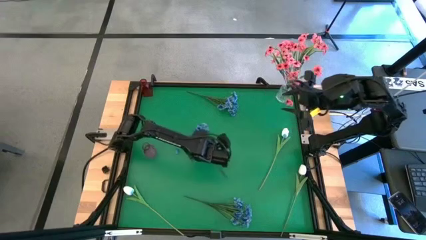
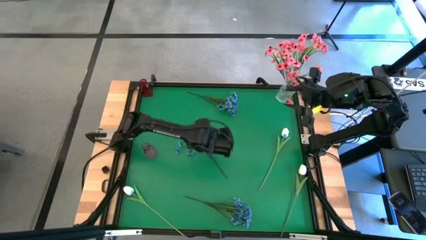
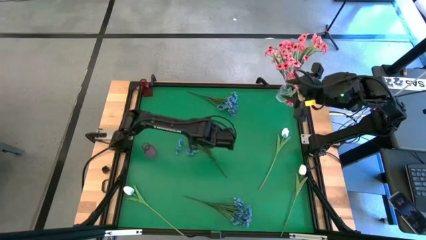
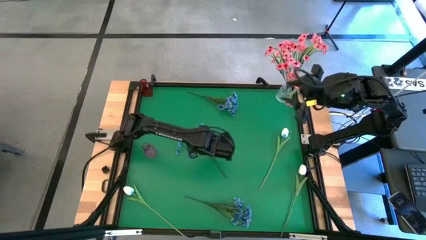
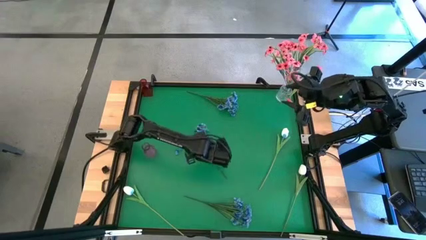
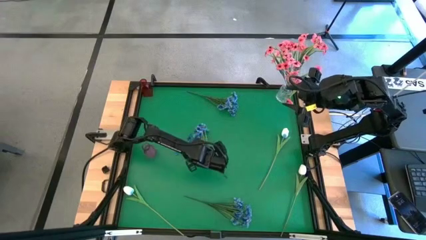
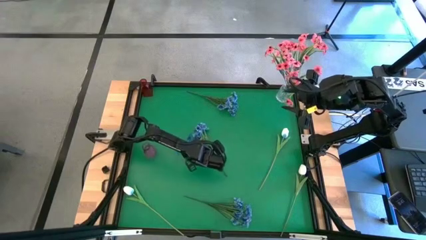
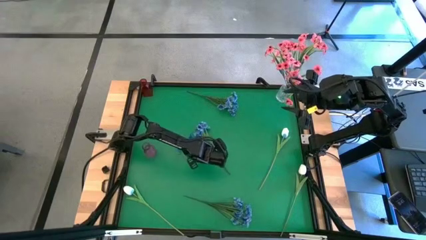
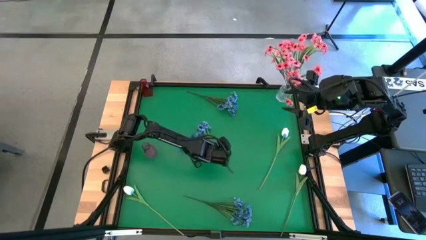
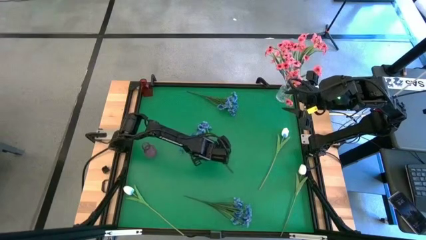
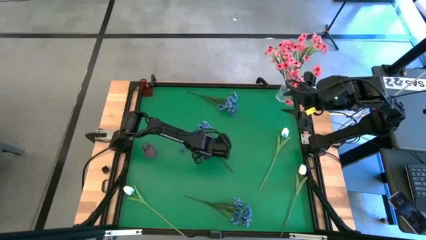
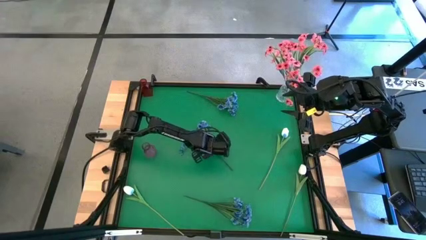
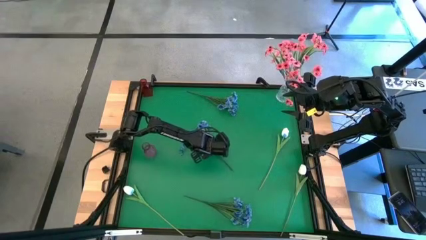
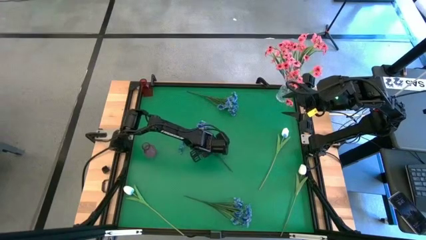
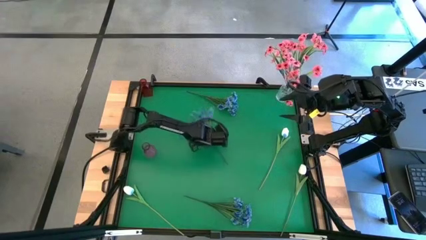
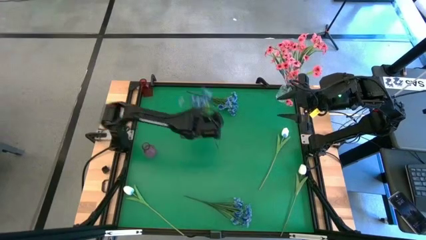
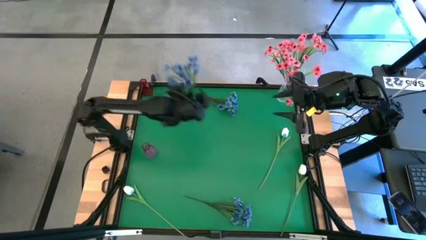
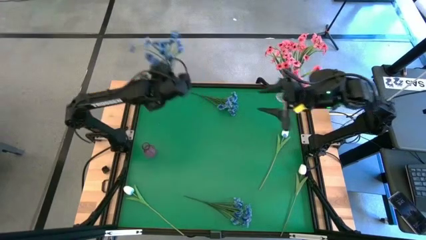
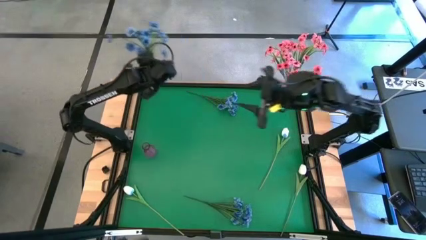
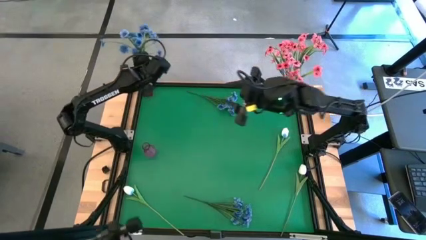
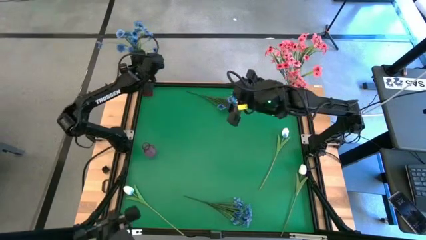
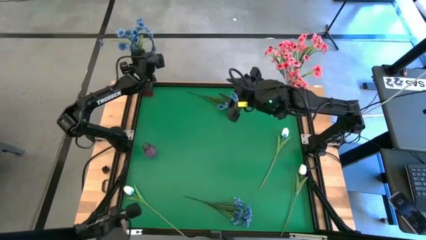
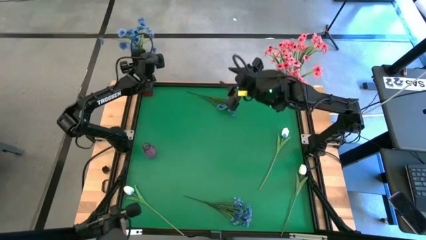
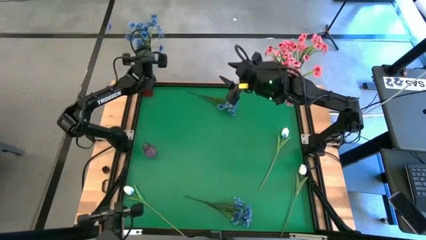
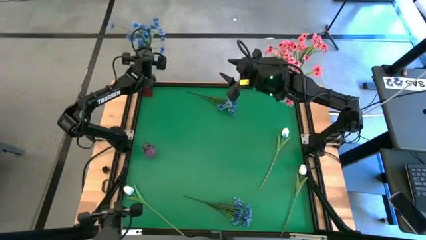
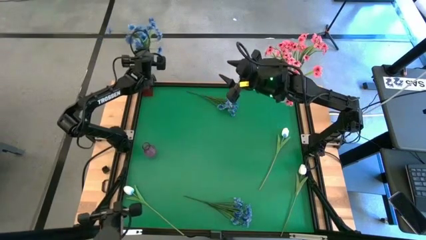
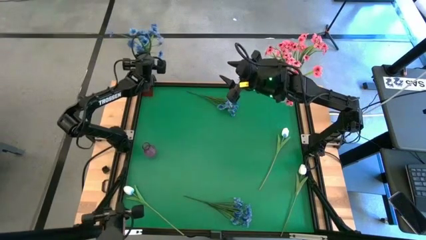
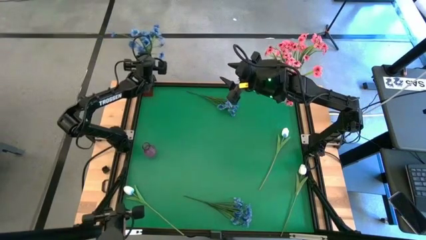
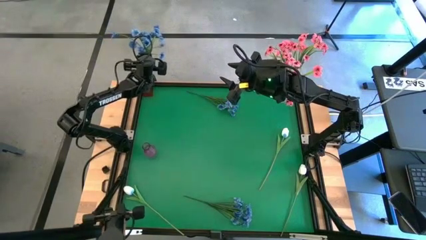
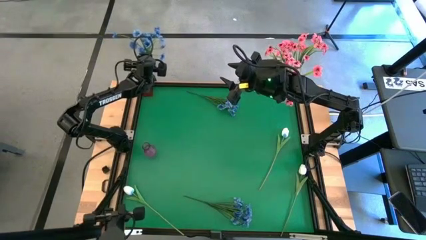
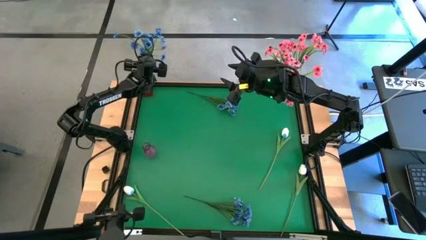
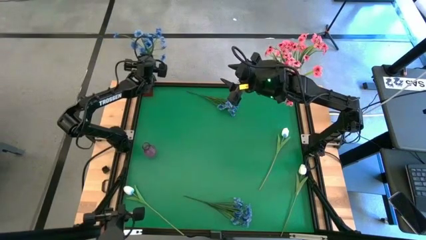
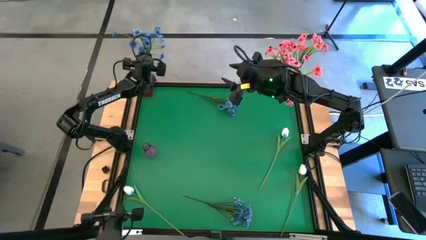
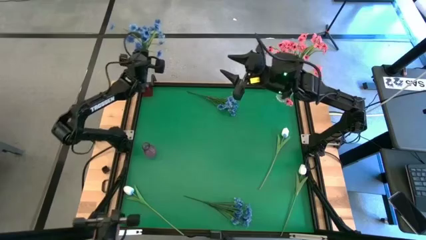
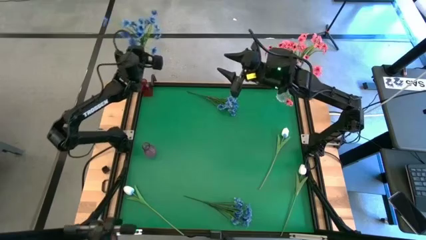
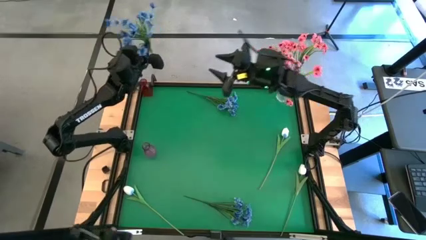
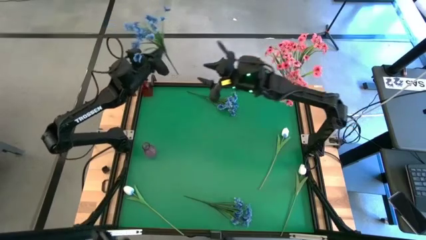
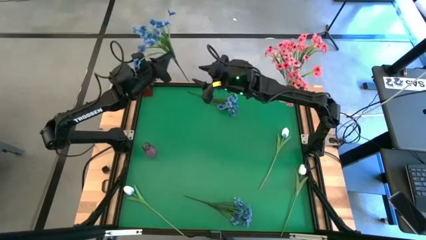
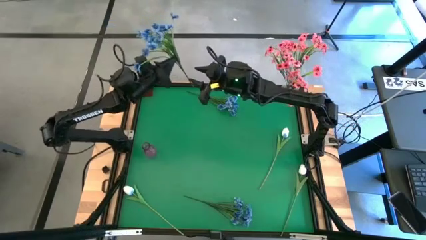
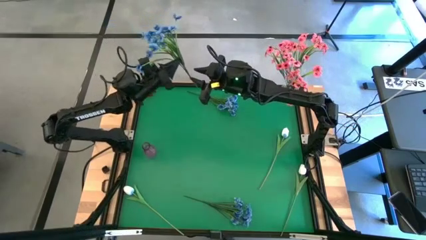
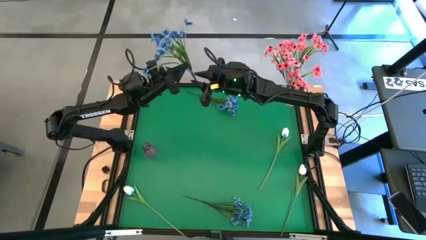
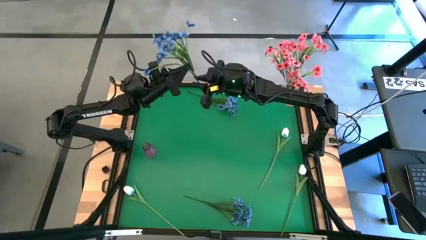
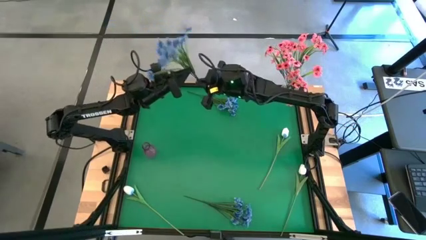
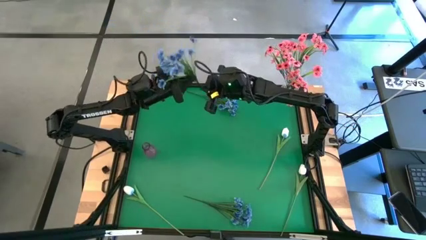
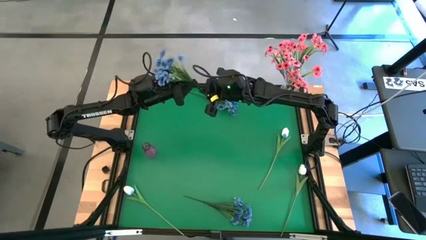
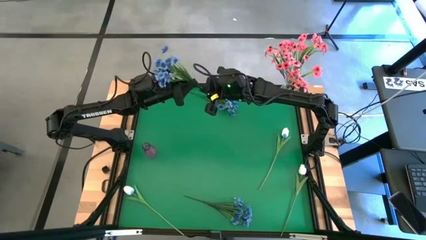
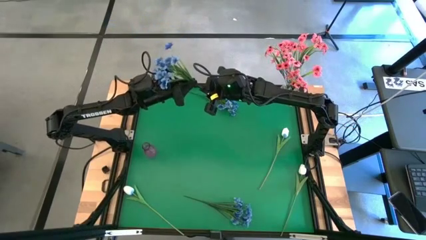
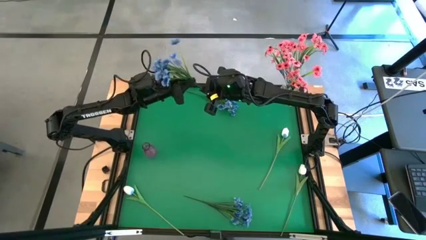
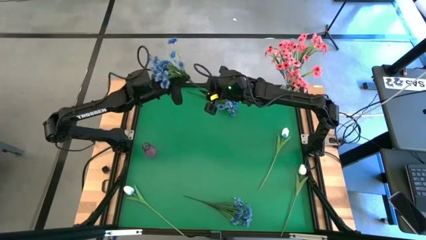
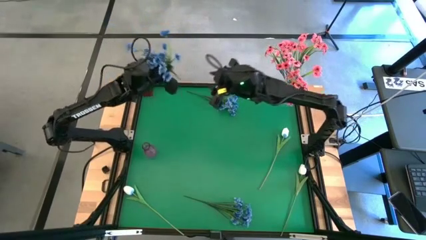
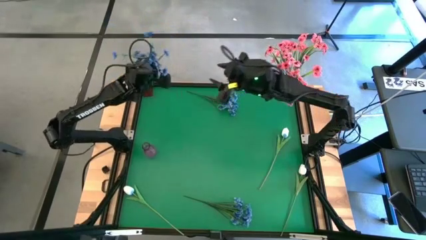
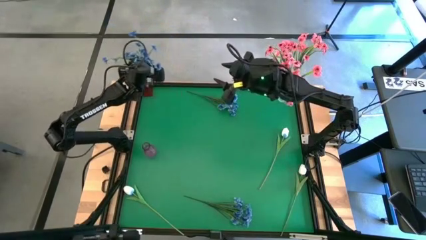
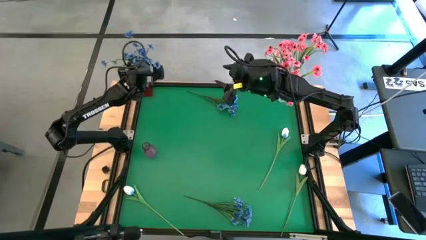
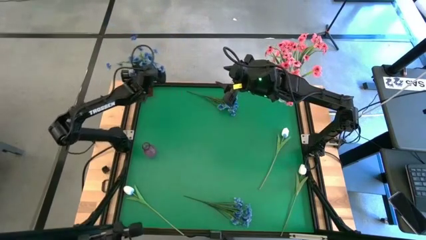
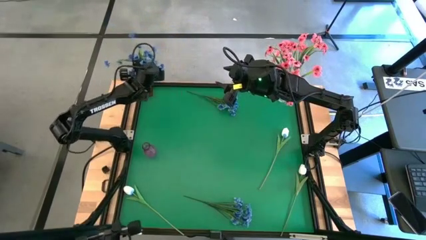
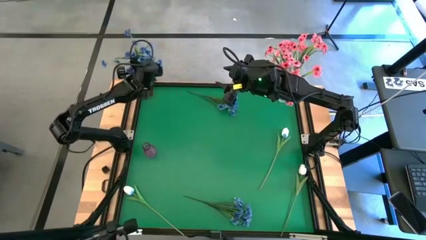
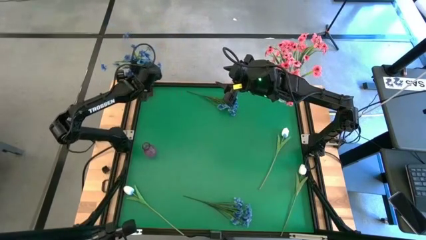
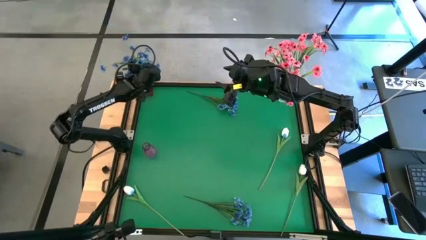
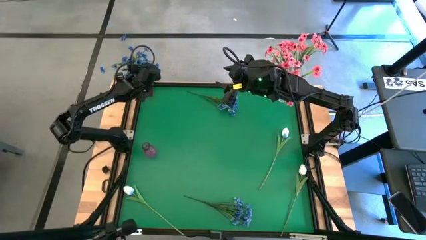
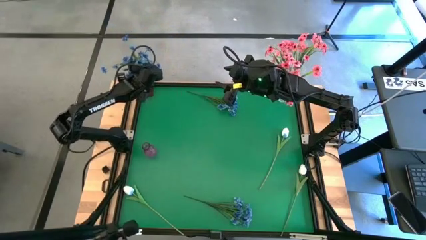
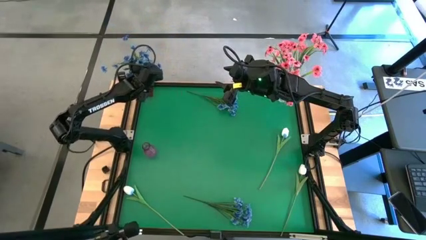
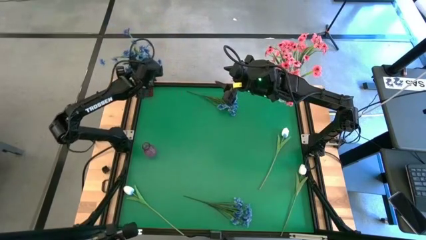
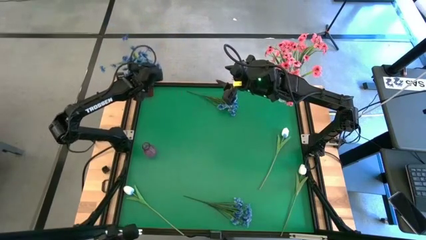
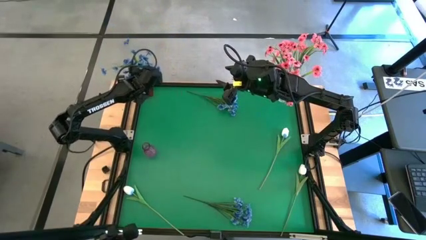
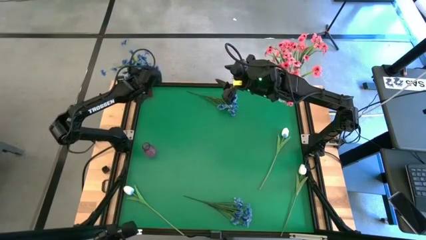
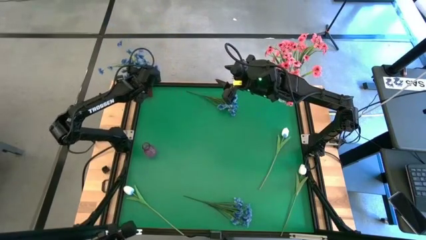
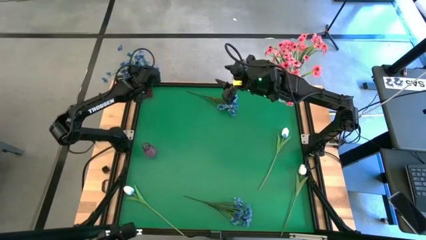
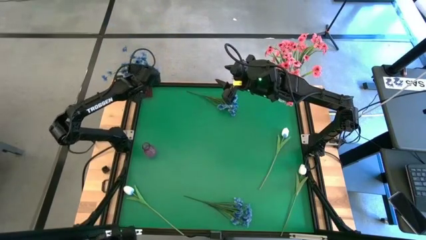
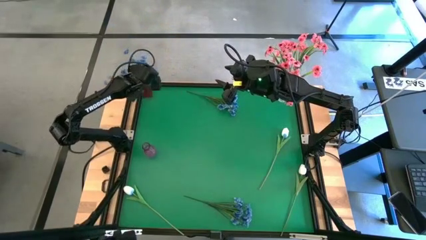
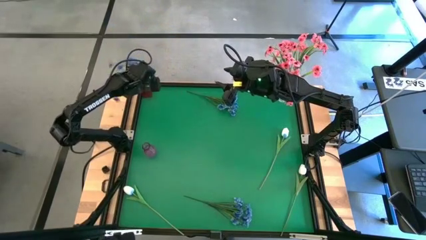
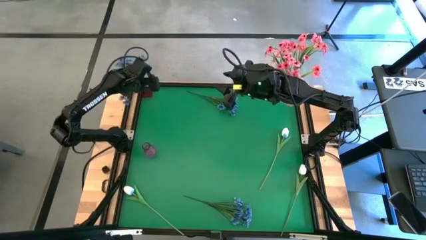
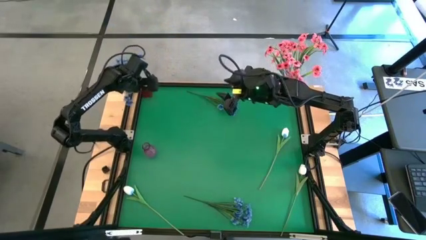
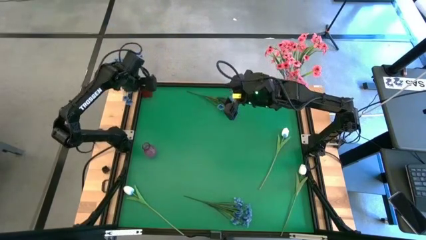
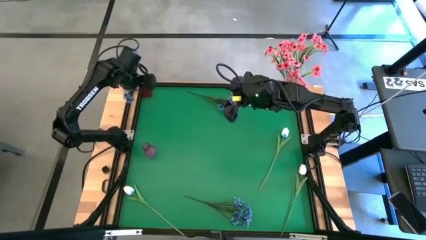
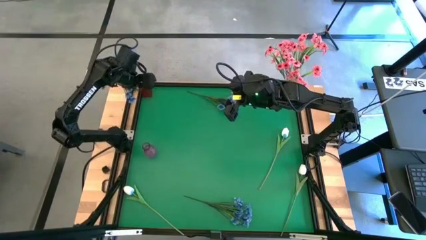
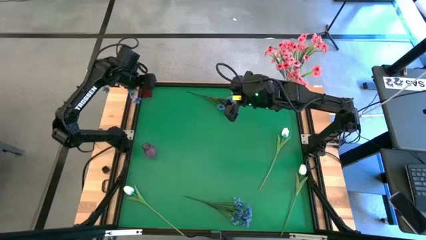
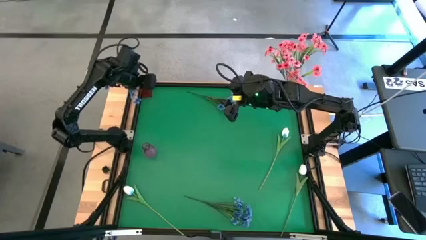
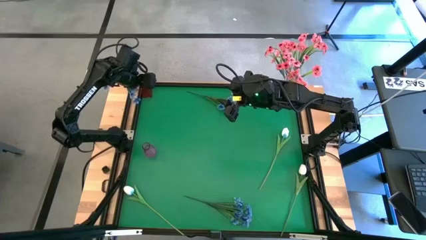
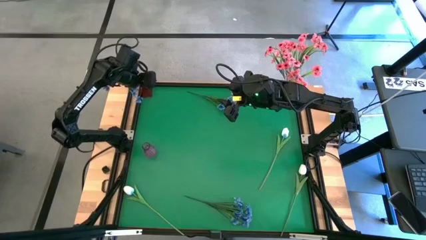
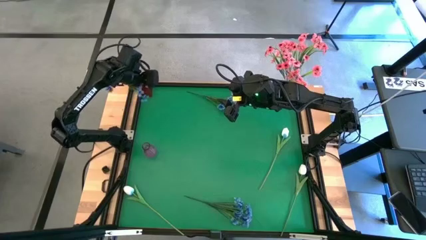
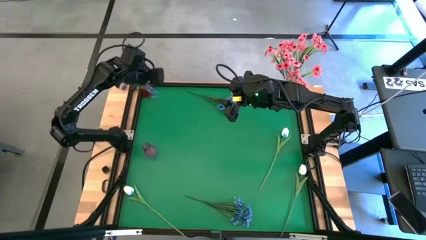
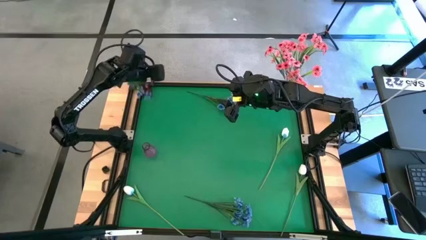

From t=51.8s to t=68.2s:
Task: Sort flowers into vase by color
Put the middle blue flowers into the red vase
